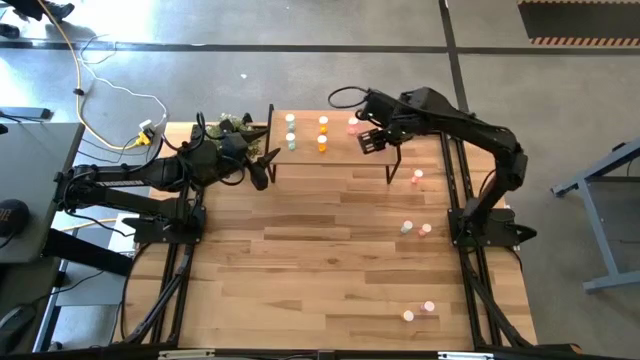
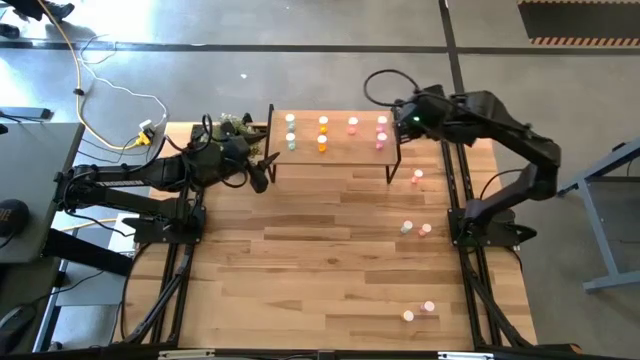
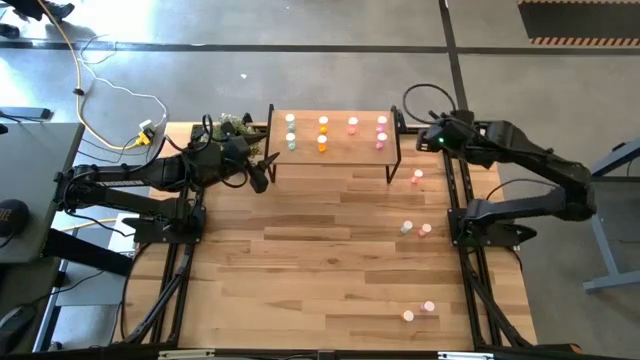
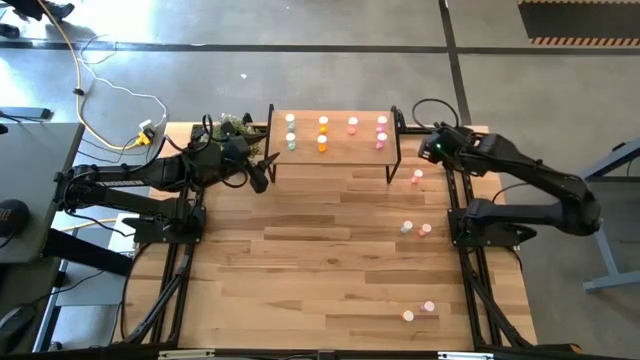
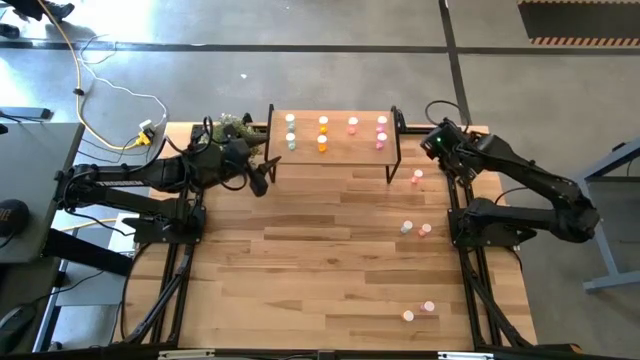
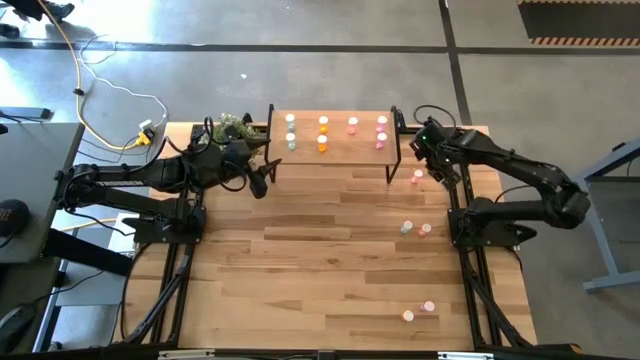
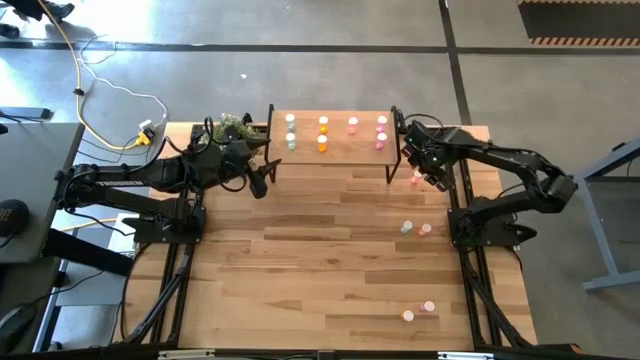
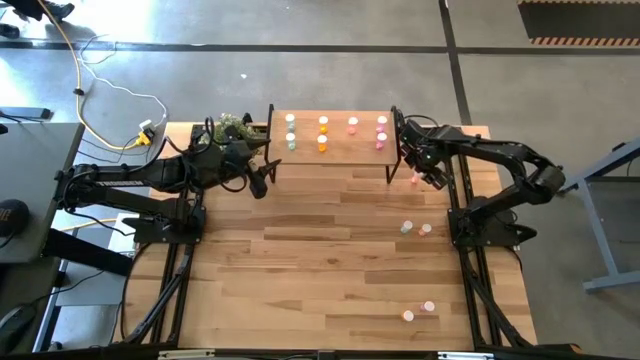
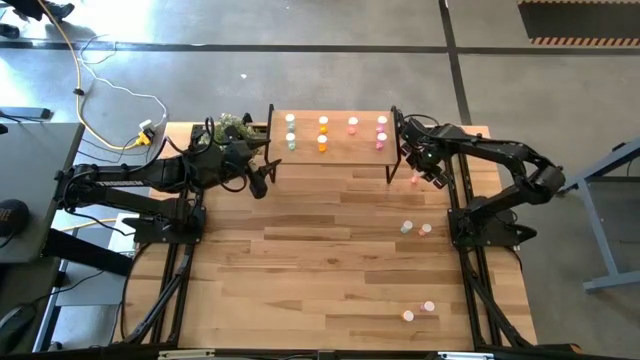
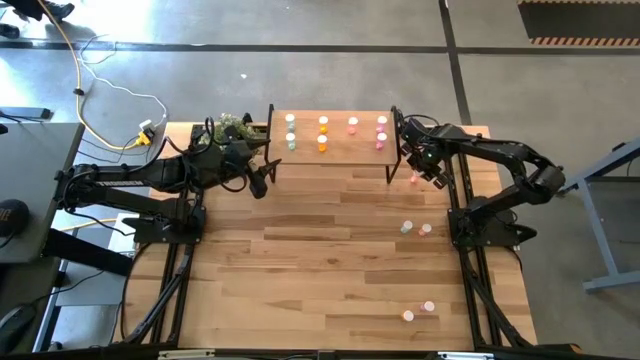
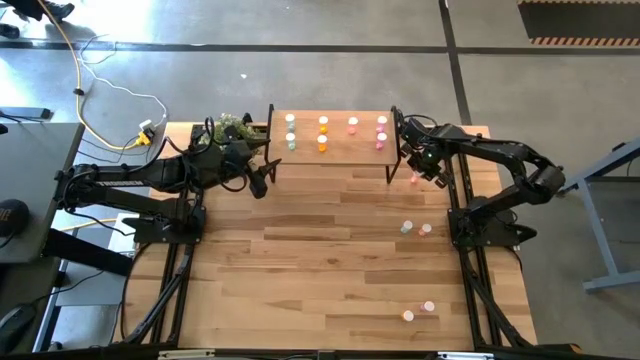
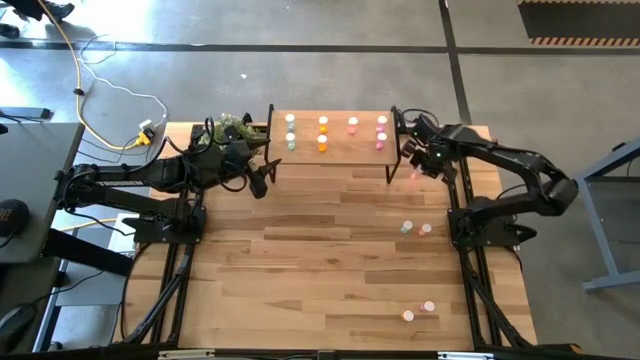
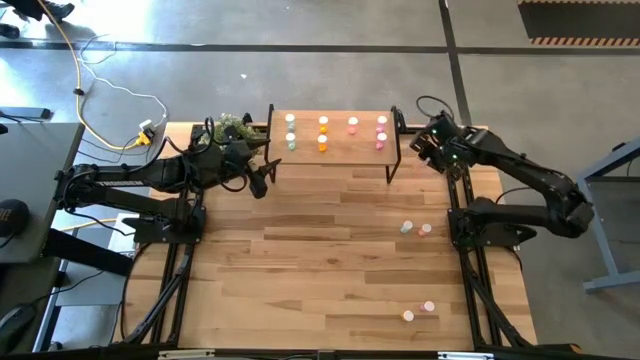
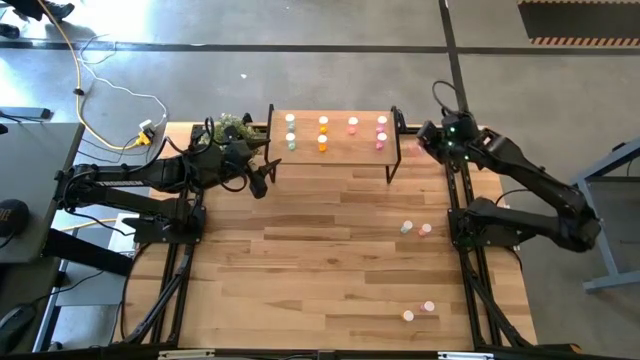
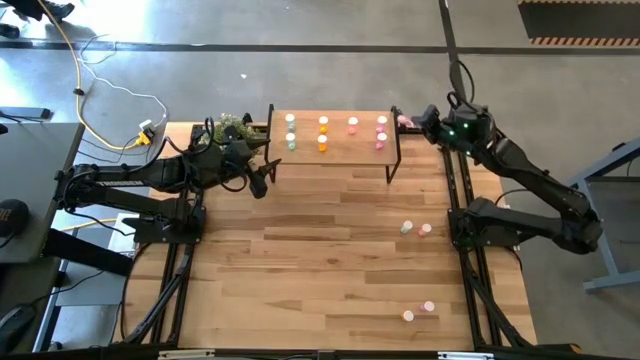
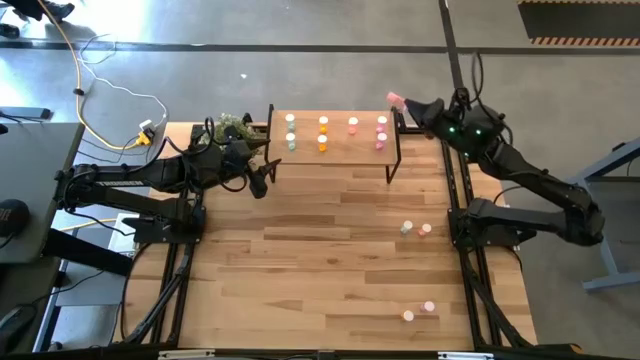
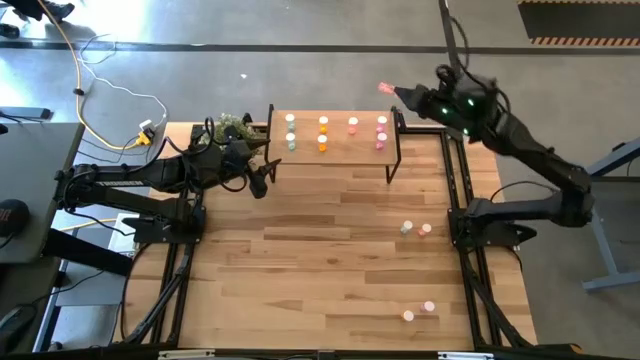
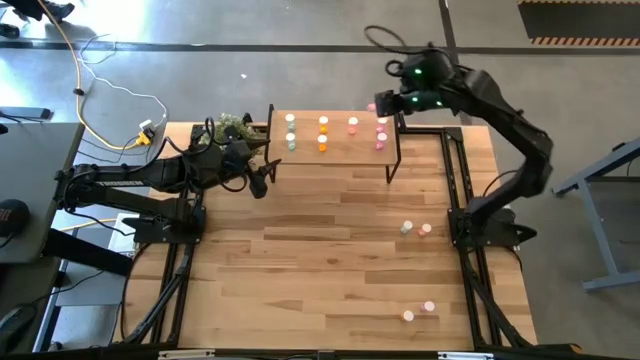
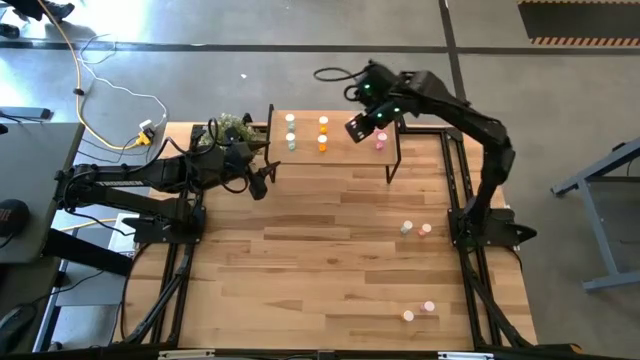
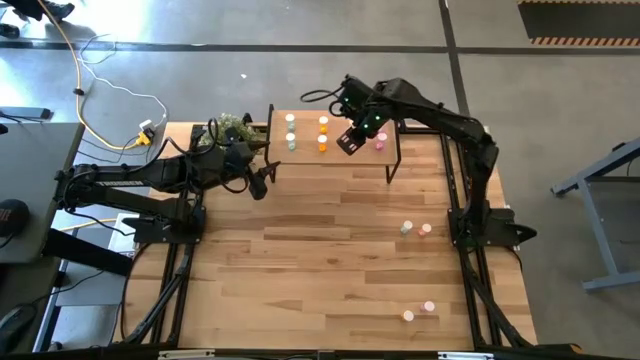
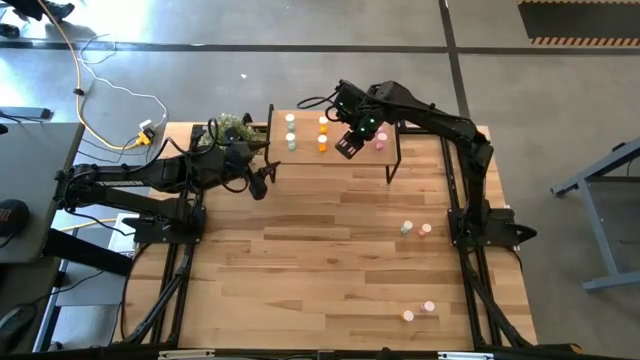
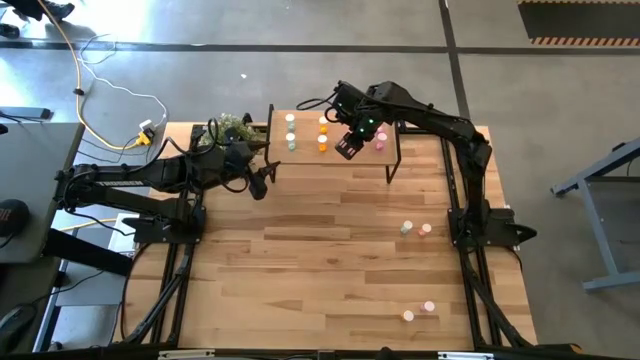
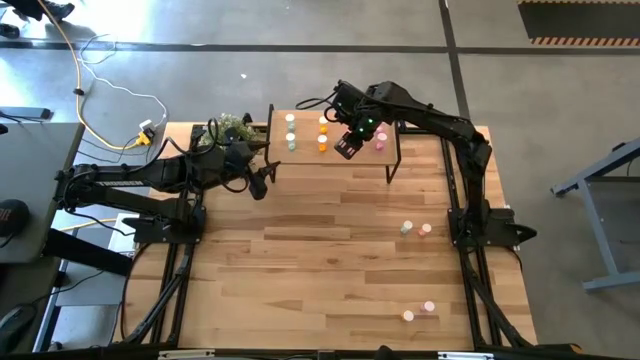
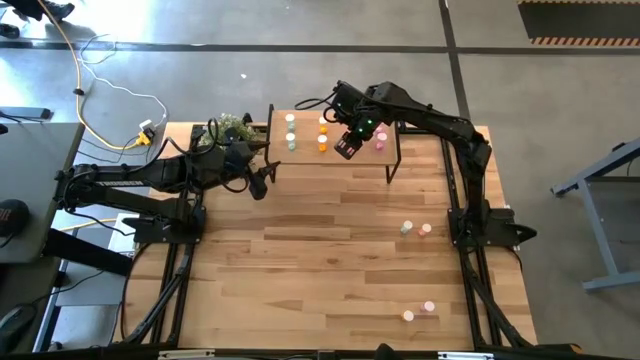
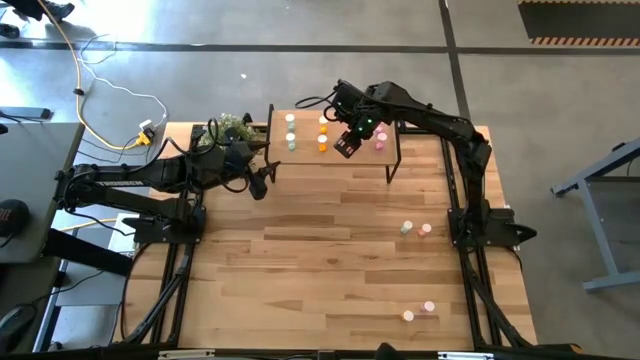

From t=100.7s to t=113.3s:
Task: Pick and place medicine bottles onto shelf by color
Put the top pink pill bottle on the shelf aligned with the other pink pill bottle

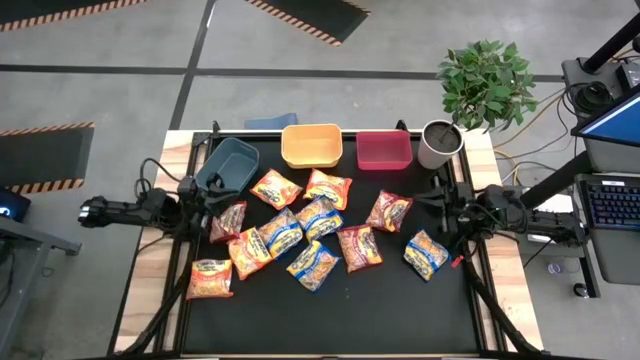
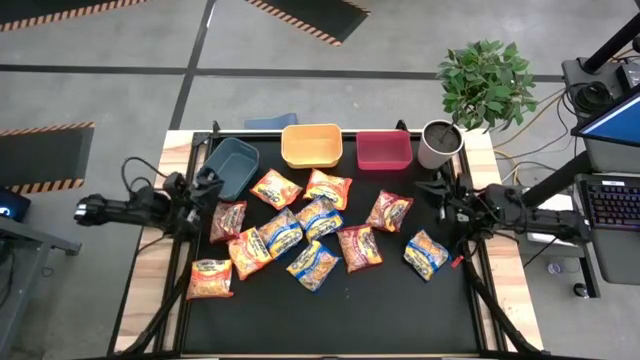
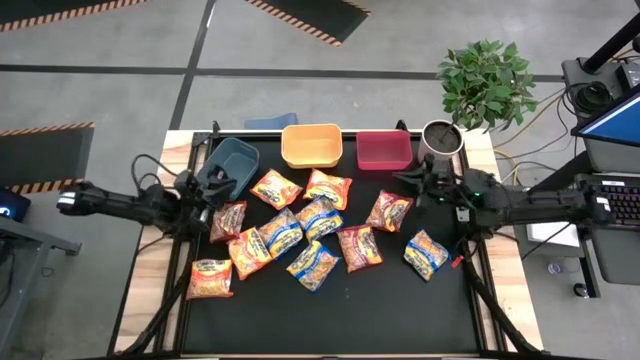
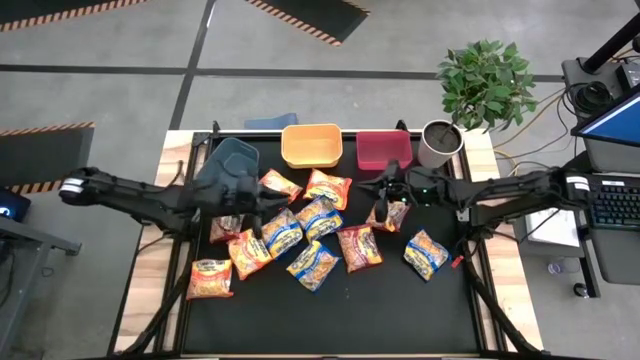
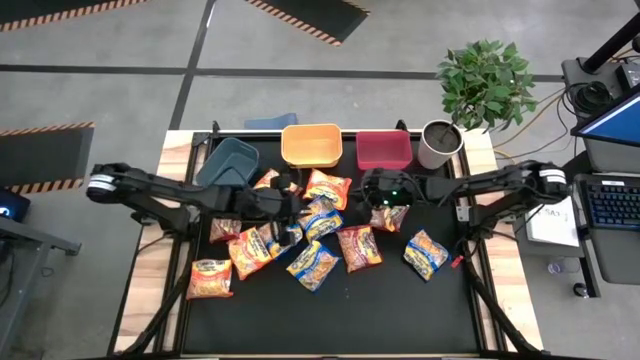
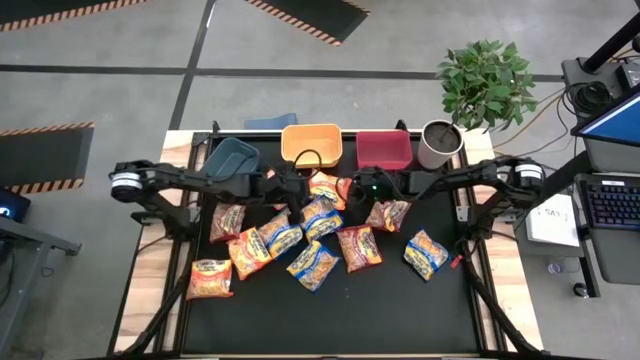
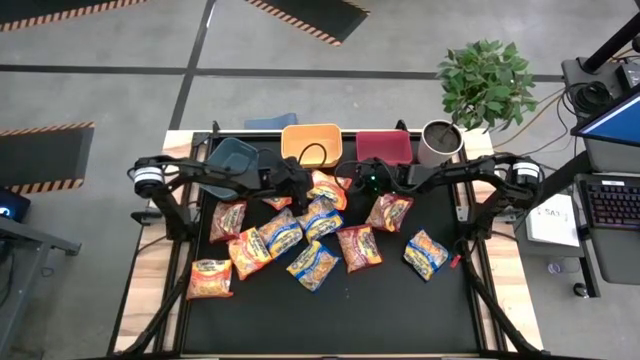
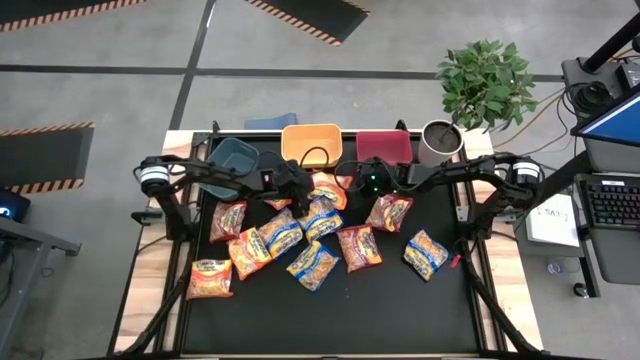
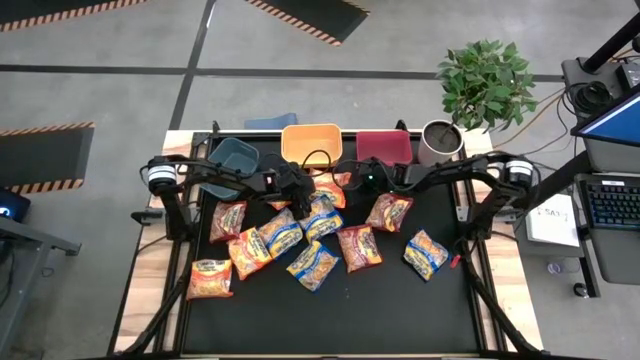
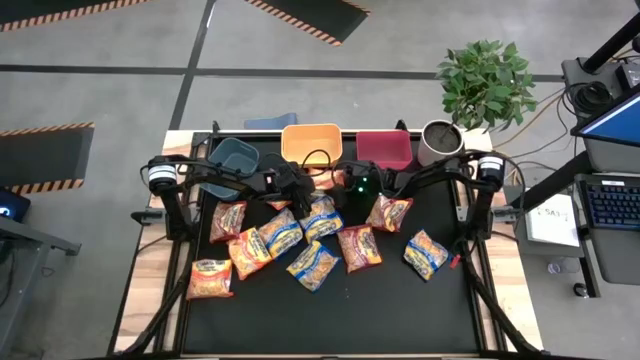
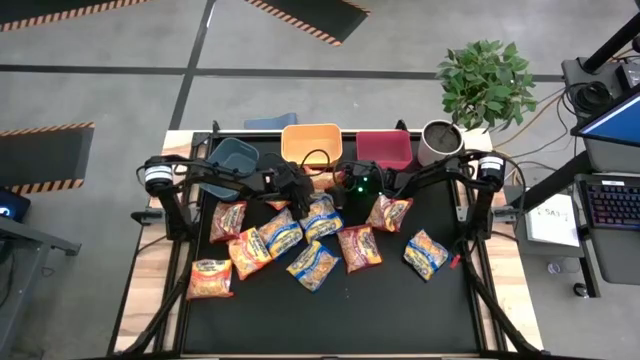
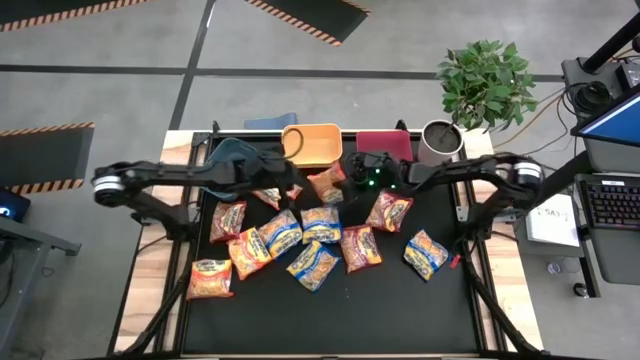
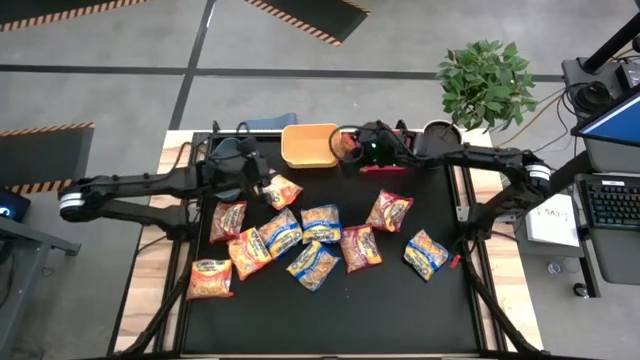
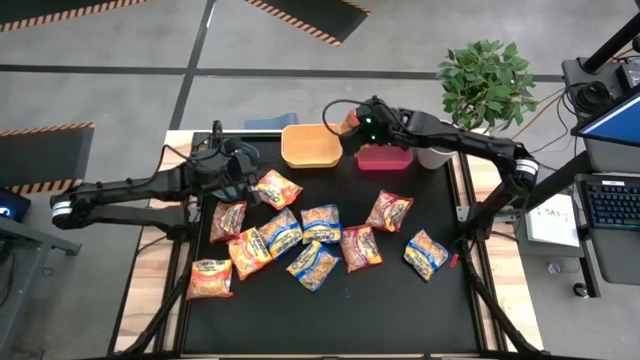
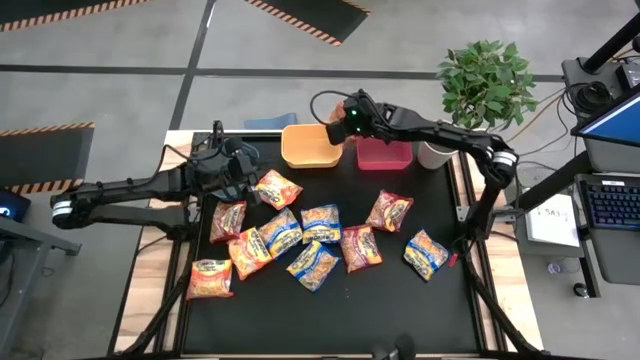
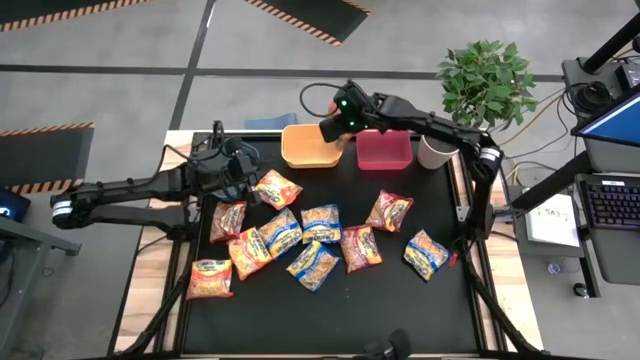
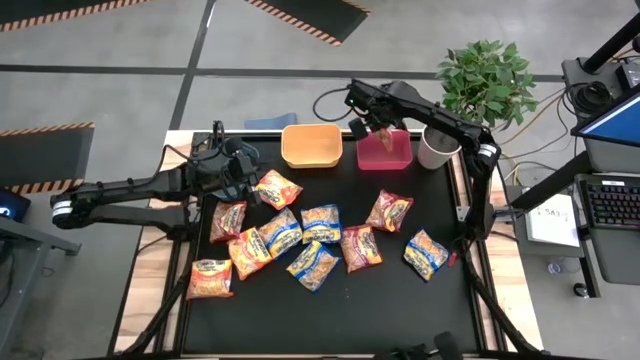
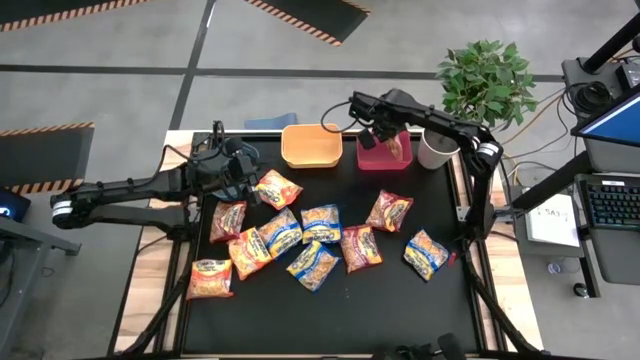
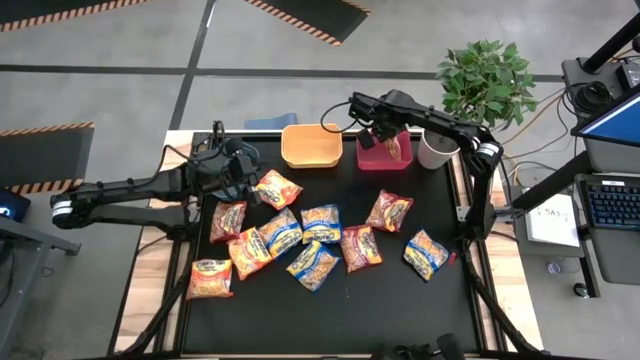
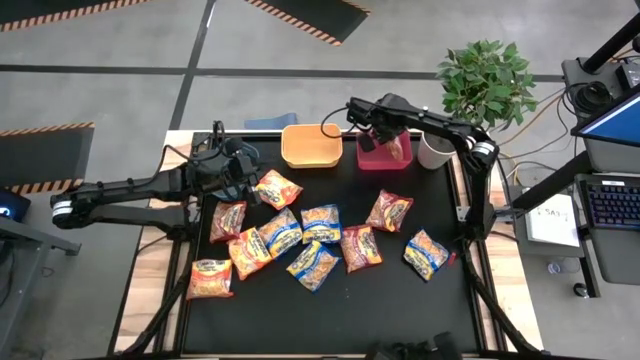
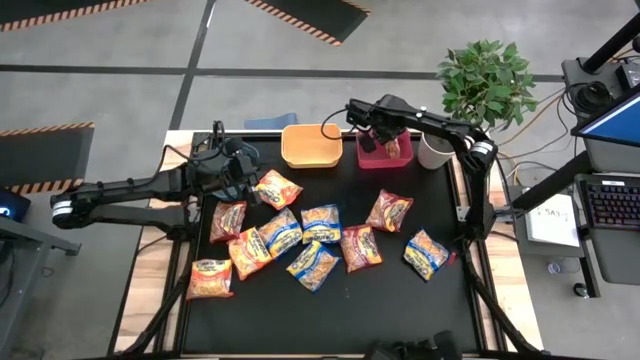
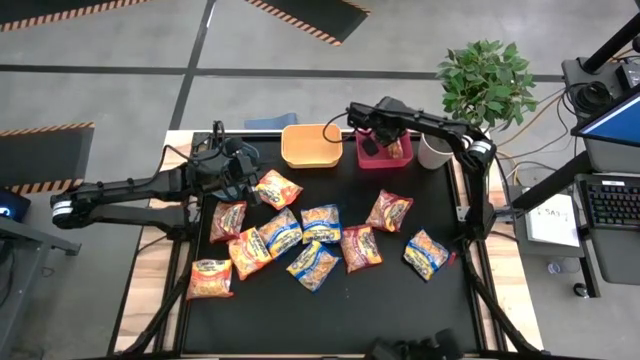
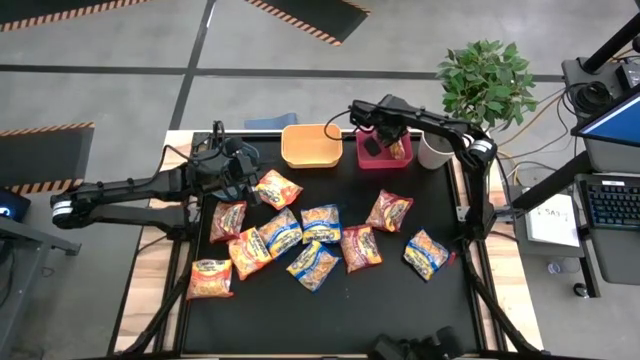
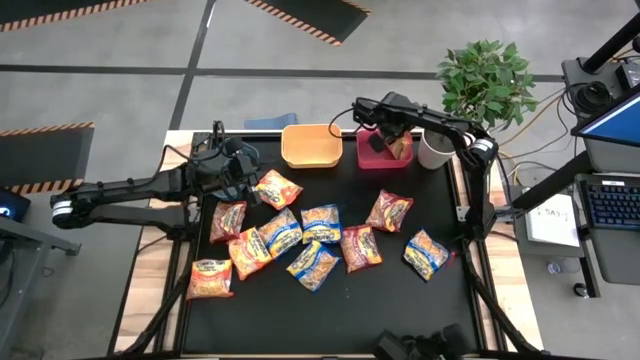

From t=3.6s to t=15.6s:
Task: Sort Maruchan noodles
Put the orange noodle pack into the red bin
